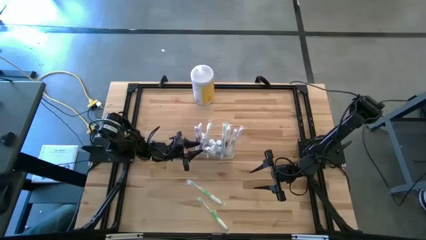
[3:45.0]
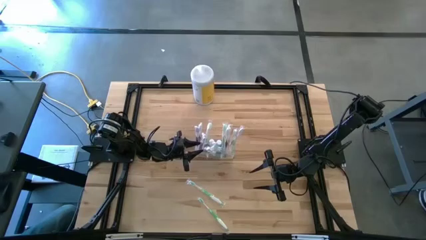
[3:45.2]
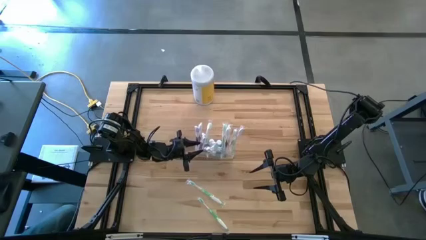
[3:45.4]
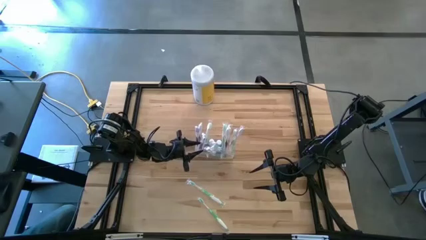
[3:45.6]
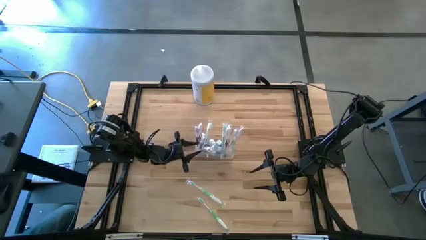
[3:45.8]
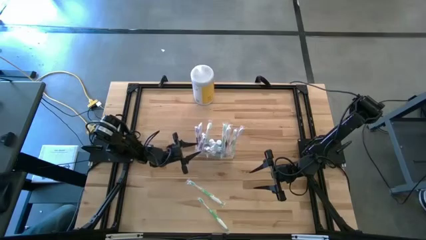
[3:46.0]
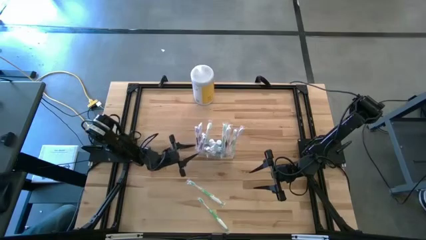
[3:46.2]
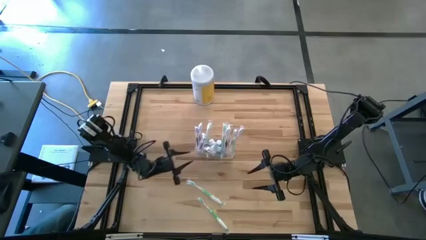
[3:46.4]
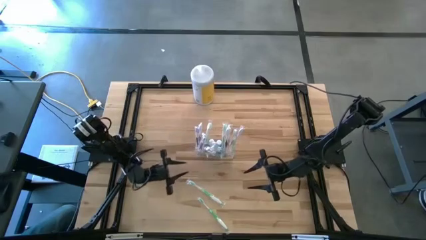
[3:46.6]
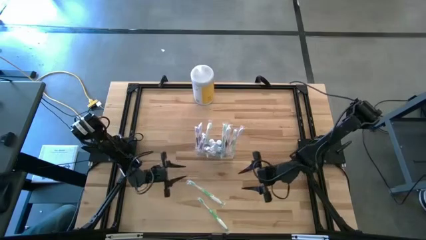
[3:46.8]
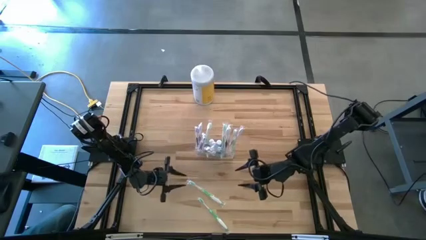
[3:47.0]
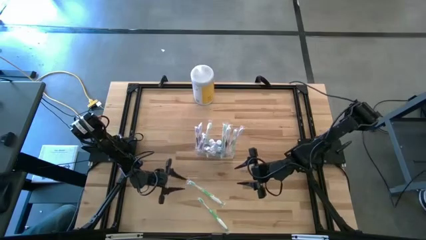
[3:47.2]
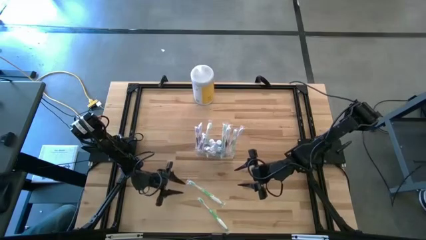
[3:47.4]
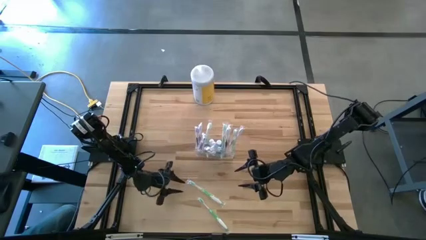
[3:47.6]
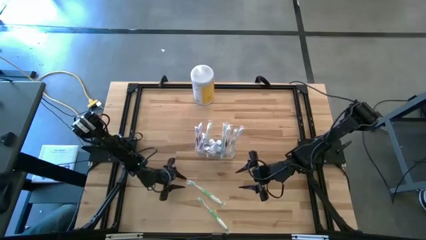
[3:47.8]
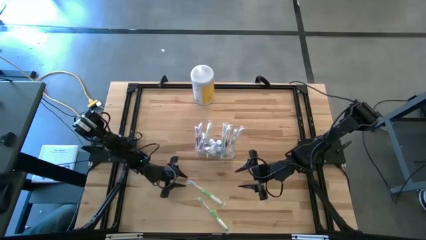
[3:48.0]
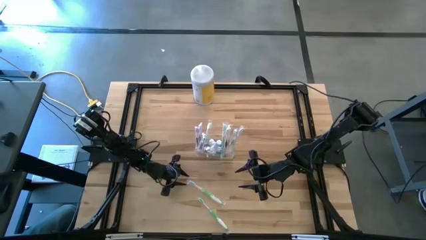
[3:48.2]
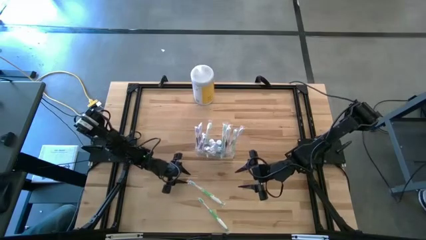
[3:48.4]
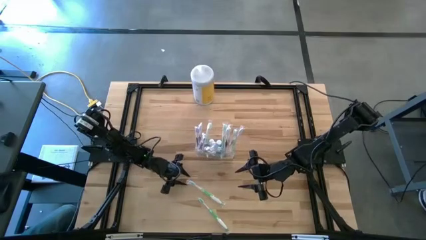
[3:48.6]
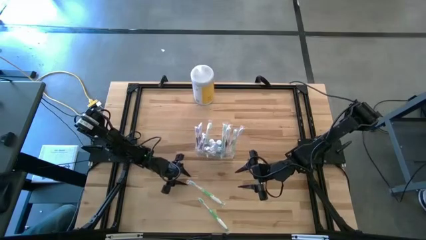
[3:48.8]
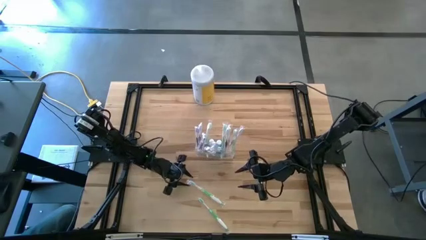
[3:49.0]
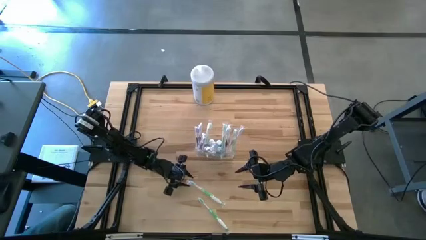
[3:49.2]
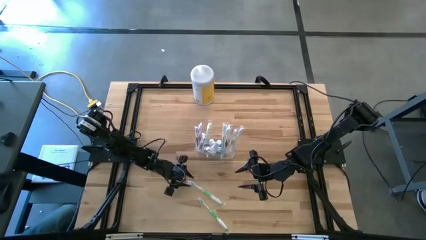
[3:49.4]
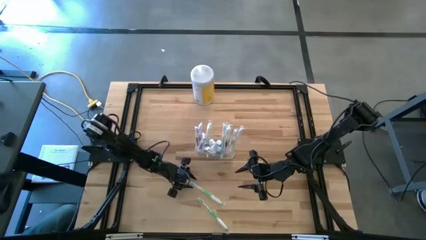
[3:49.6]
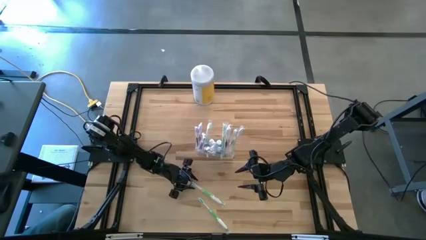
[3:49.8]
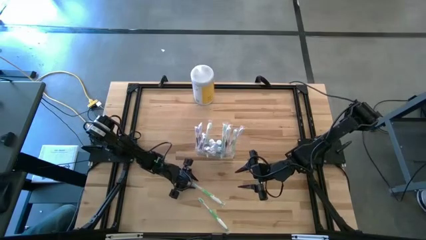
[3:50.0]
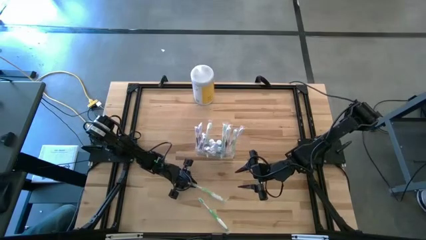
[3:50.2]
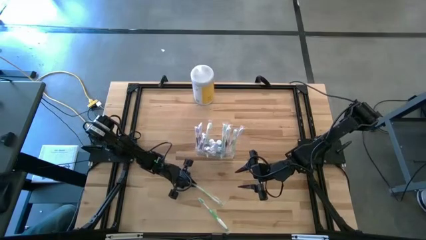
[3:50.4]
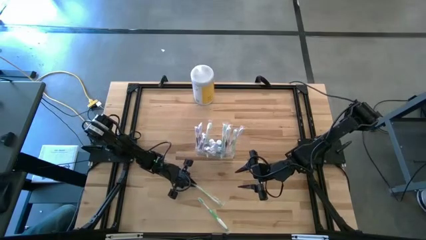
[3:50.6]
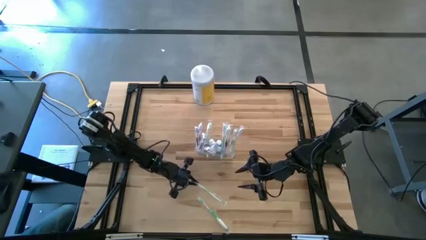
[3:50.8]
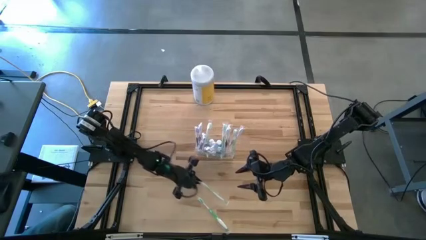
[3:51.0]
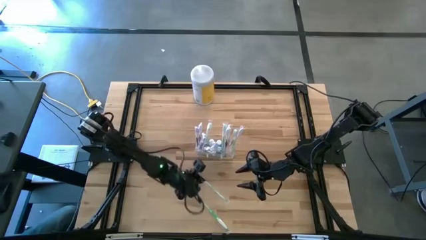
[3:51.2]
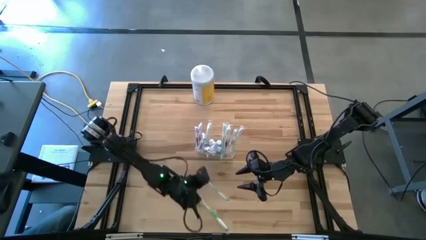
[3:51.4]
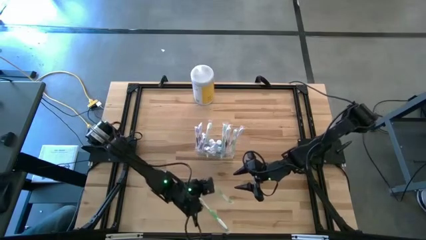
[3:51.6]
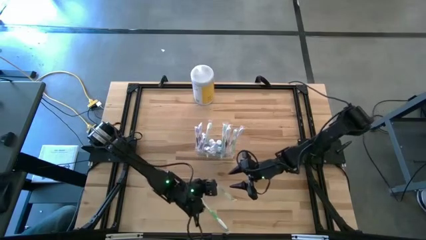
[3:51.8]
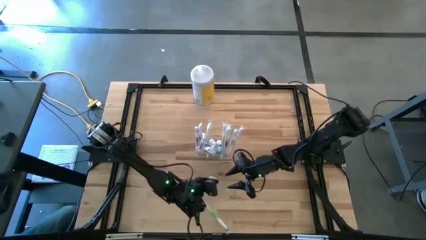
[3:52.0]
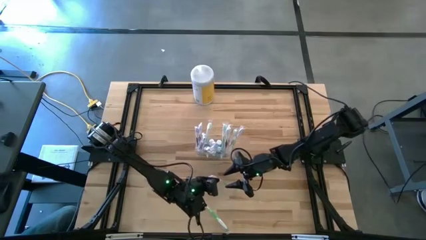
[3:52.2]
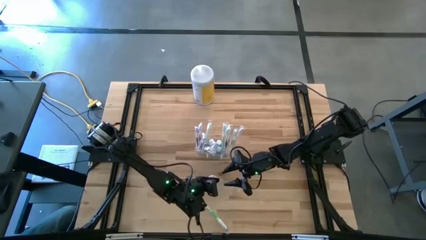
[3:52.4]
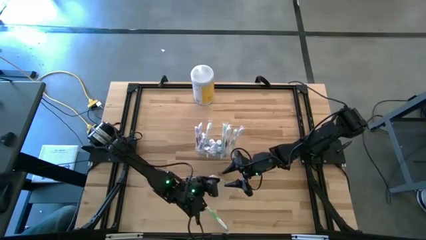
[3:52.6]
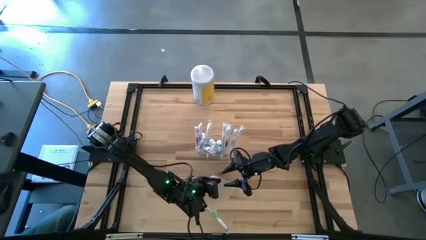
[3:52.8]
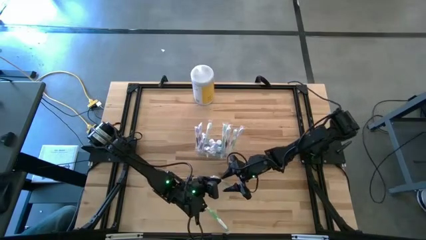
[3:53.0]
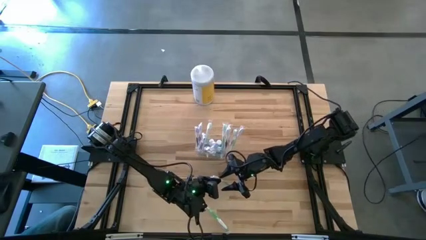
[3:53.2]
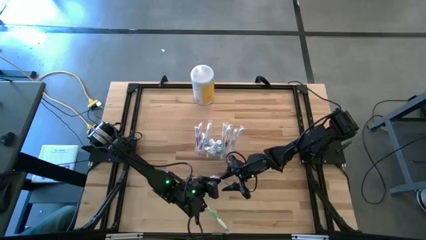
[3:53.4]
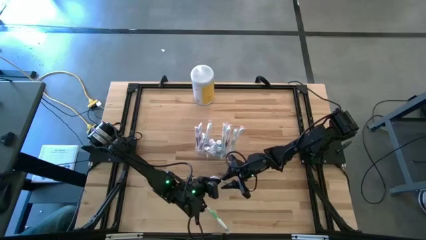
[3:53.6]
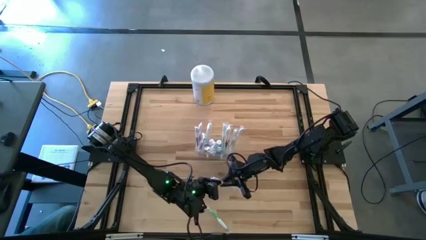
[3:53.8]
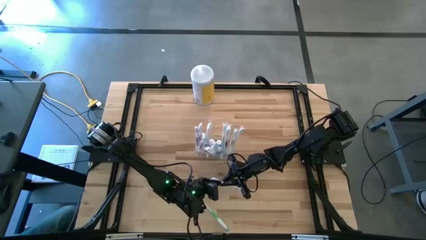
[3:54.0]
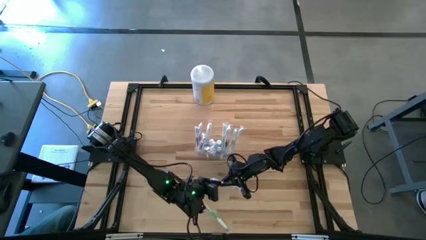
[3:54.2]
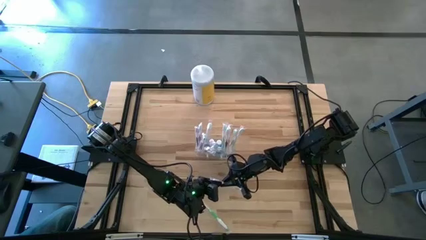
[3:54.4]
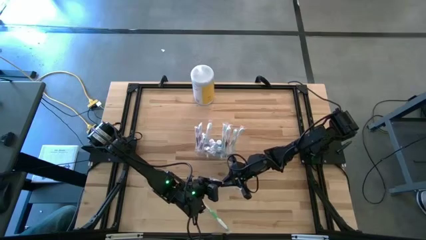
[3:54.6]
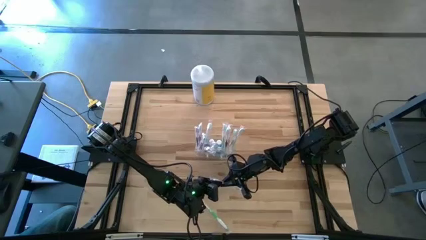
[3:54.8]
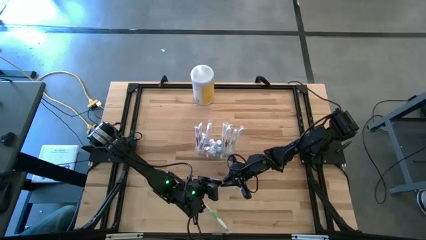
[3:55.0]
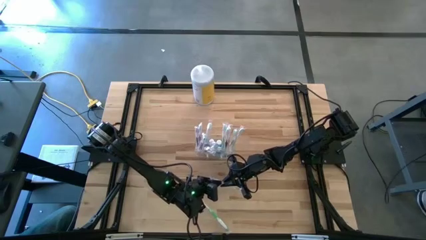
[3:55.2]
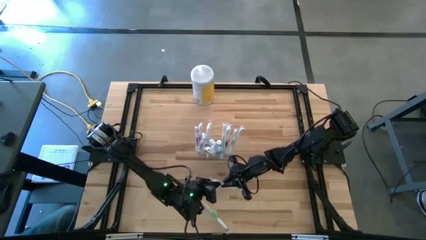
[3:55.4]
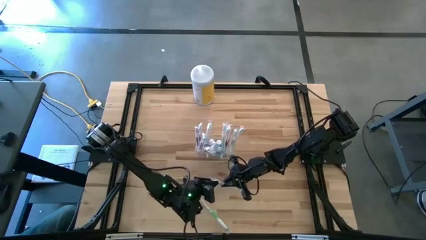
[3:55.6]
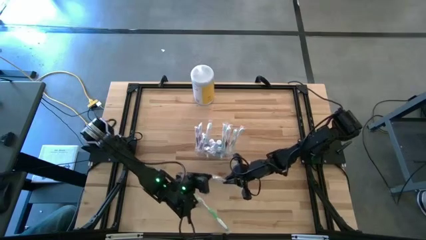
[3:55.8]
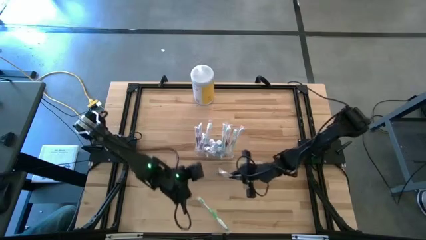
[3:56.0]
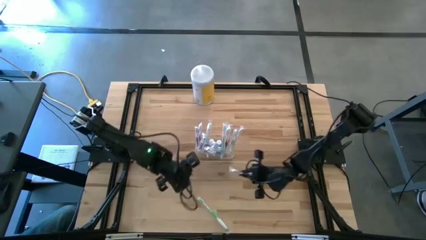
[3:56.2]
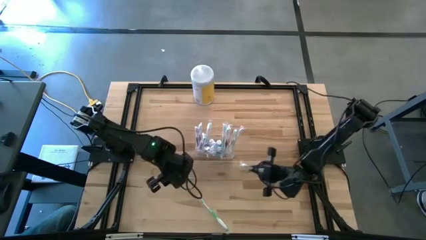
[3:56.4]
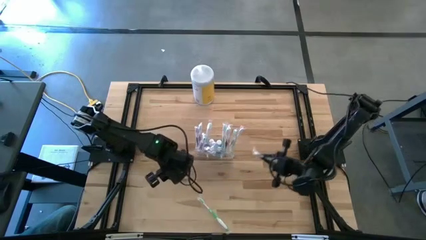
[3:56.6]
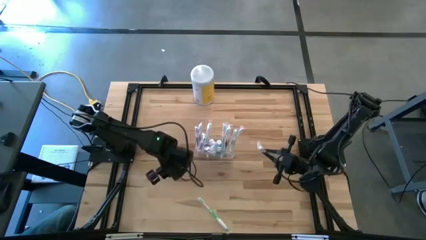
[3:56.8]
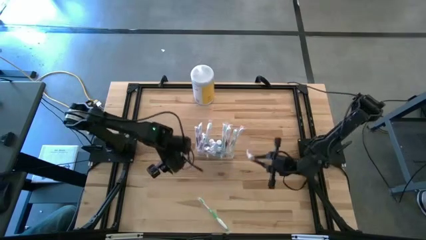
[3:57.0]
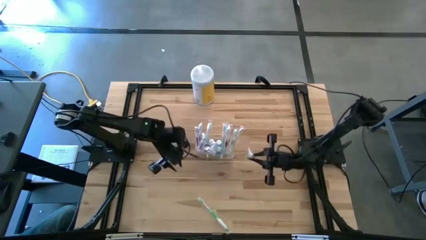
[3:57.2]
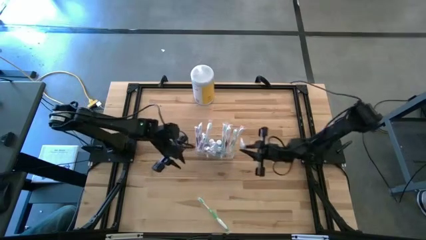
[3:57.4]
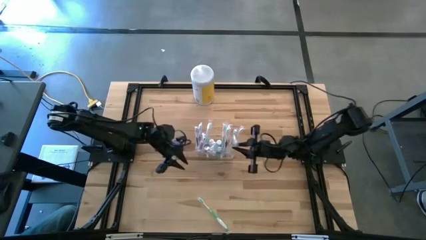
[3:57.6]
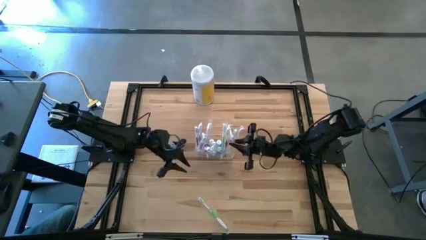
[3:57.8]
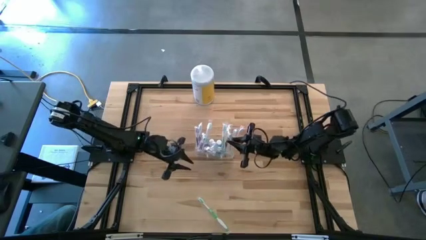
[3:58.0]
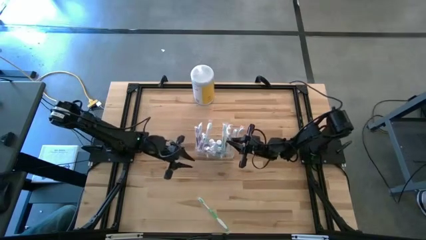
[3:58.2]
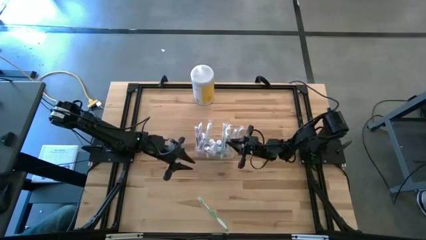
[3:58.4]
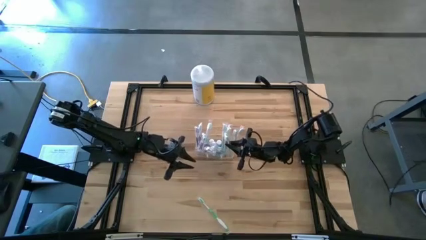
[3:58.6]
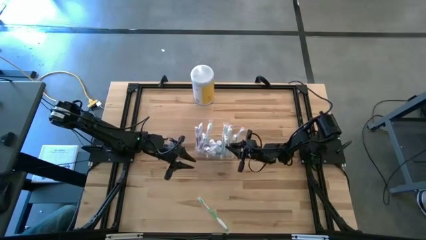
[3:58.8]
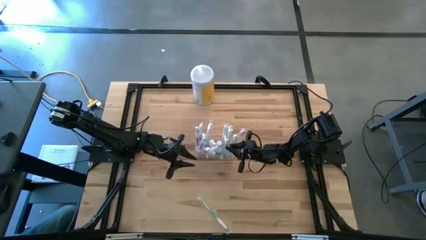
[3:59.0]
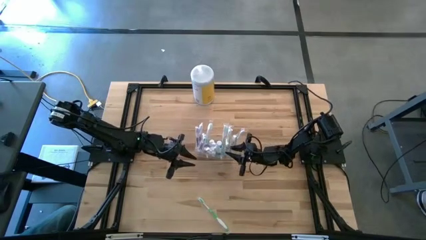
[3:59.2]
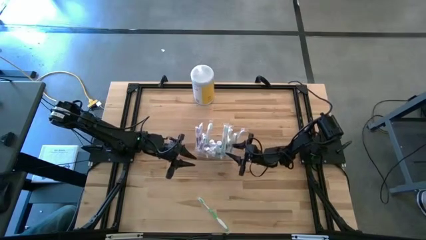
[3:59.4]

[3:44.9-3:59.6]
Task: Pick & Place toothbrushing station
Put the green toothbrush into the transparent organizer

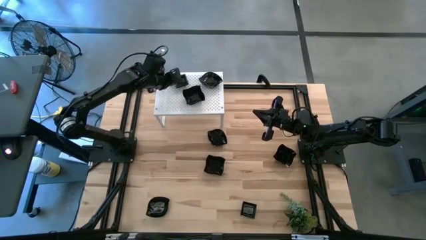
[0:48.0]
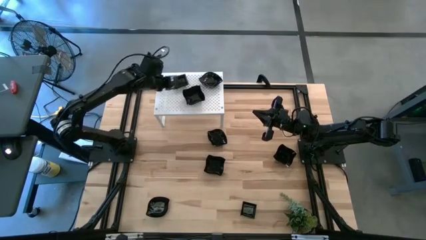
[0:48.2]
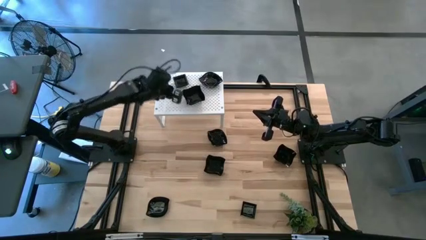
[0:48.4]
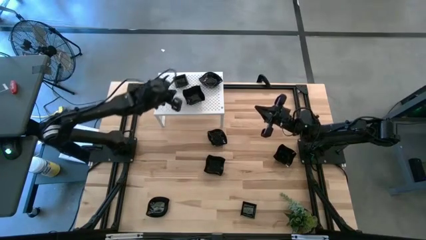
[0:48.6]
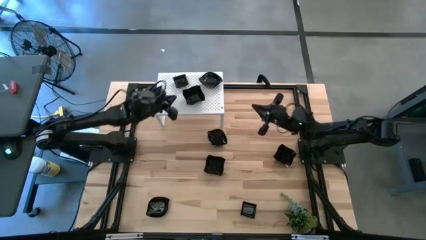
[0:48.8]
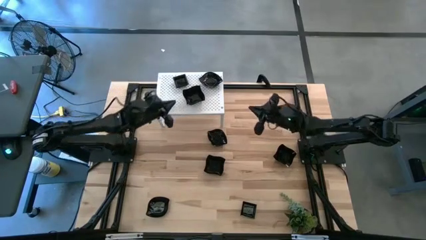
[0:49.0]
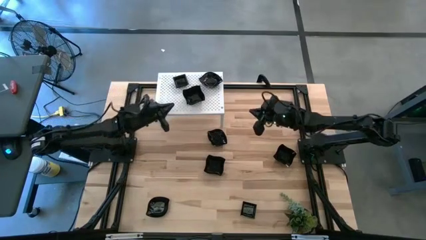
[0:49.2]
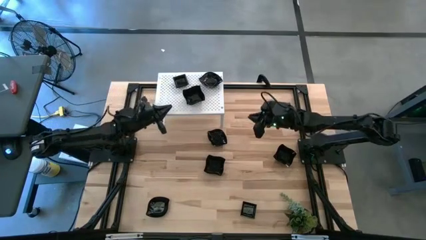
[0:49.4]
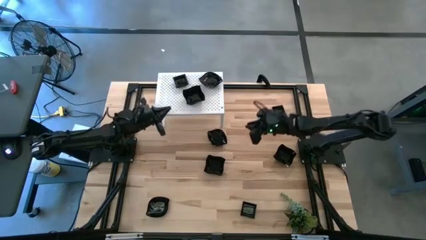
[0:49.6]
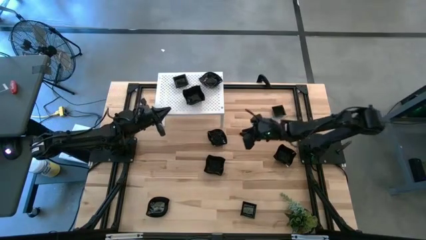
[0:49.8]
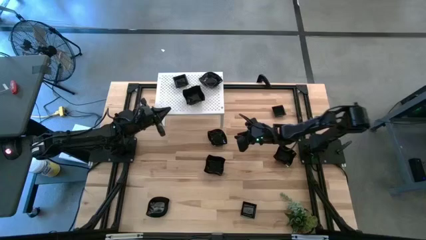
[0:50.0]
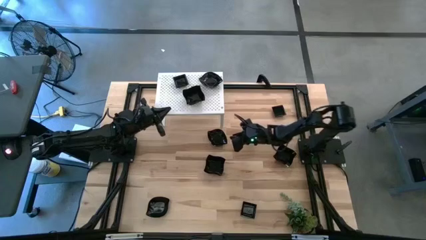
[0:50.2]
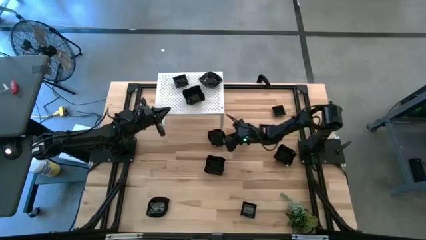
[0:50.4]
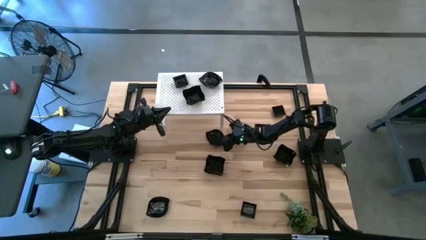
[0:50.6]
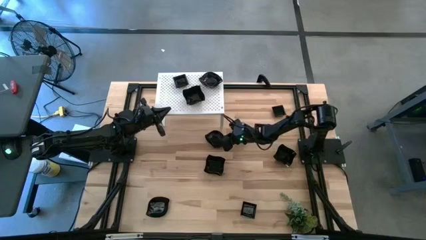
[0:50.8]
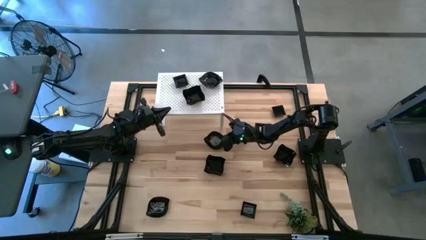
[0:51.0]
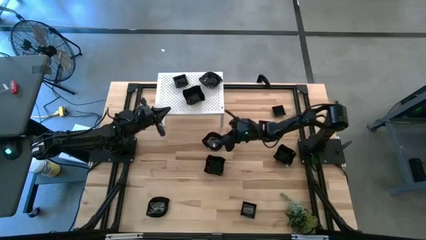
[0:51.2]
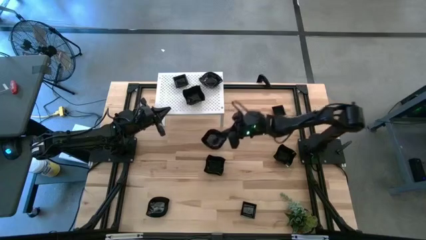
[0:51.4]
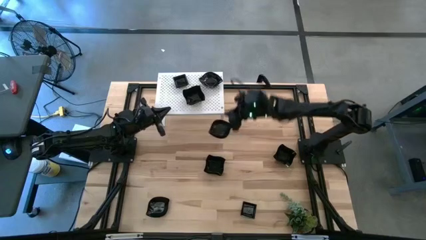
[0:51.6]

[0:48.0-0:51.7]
Task: Pick & Place Mini shaped plates
Stack the black leaf-shaped plate on top of the black leaf-shaped plates on the shelf
